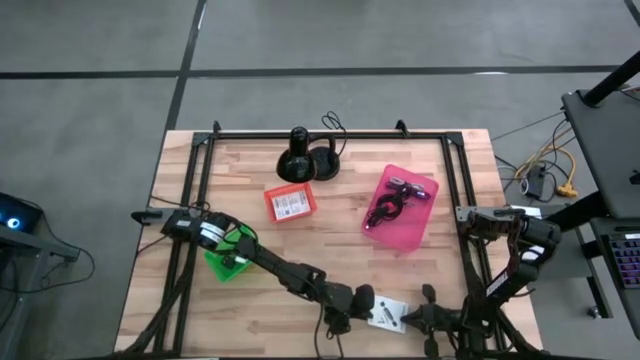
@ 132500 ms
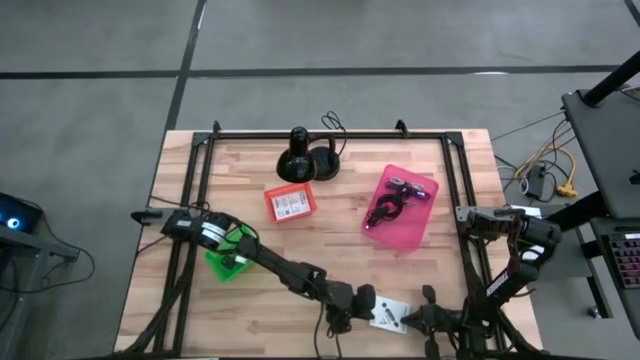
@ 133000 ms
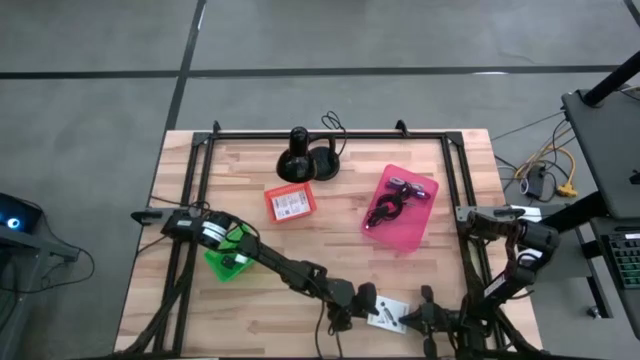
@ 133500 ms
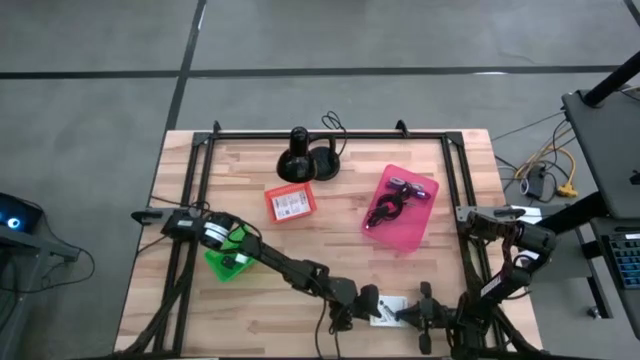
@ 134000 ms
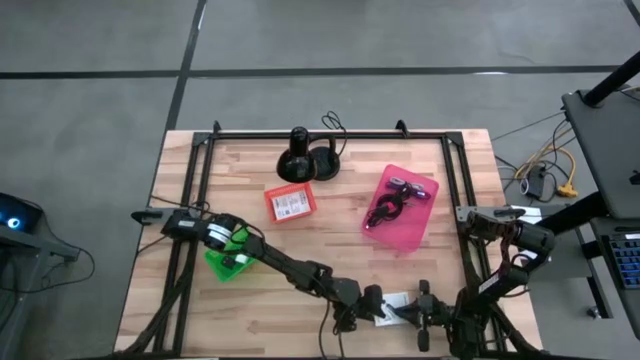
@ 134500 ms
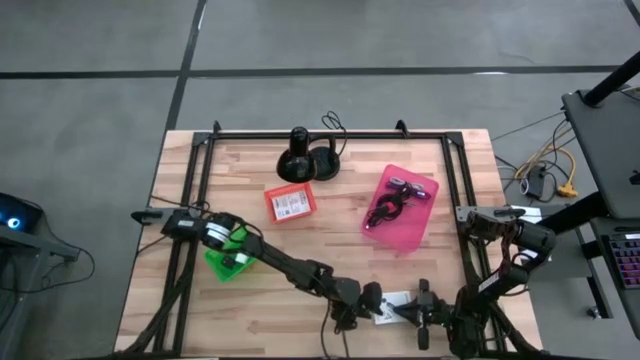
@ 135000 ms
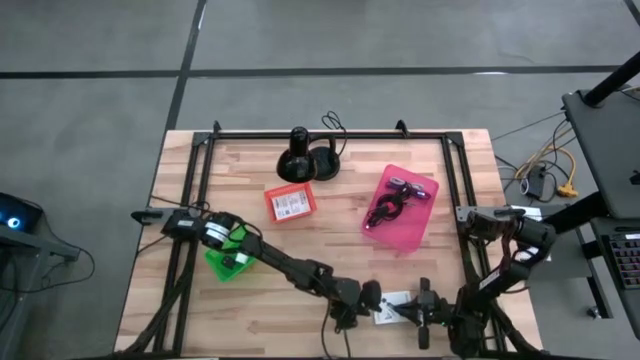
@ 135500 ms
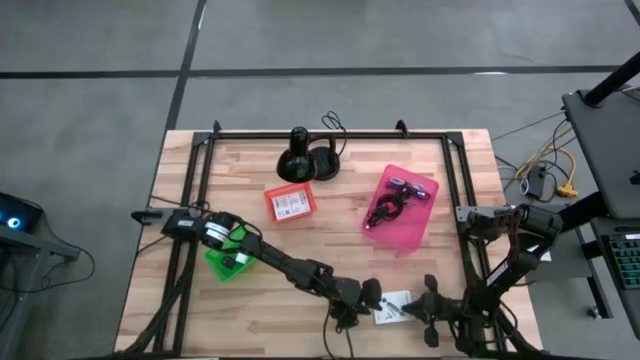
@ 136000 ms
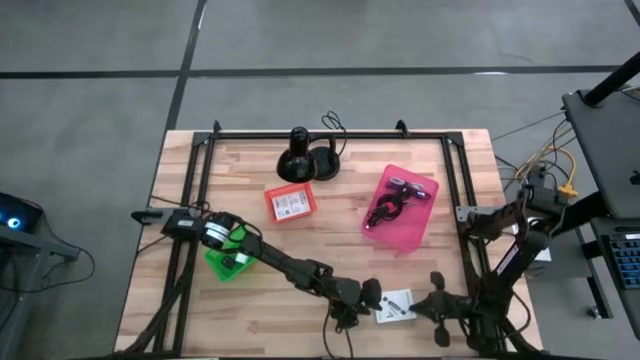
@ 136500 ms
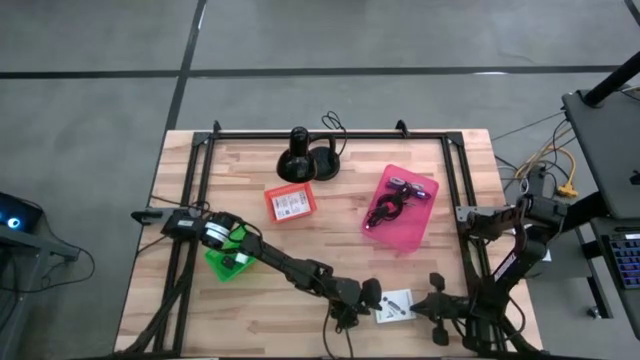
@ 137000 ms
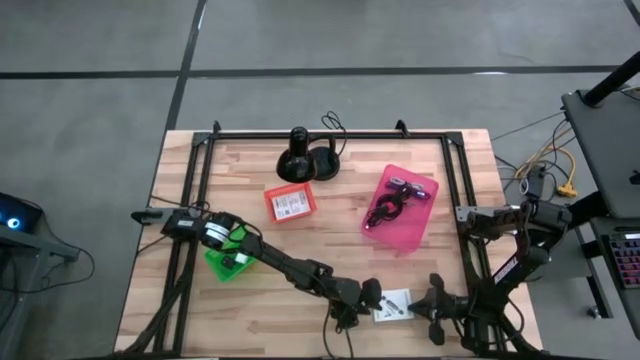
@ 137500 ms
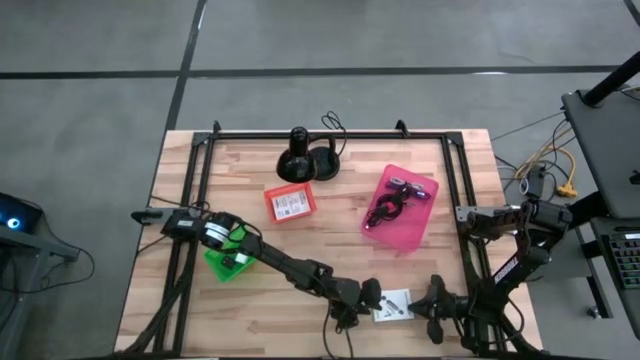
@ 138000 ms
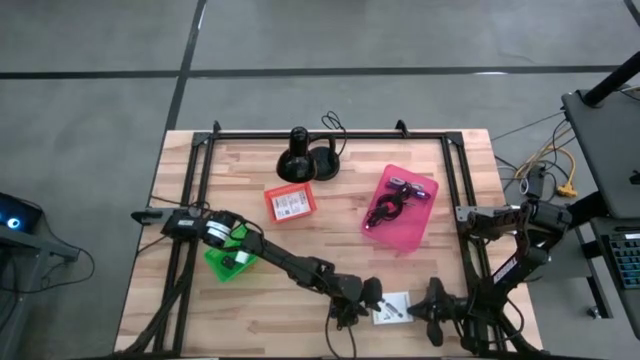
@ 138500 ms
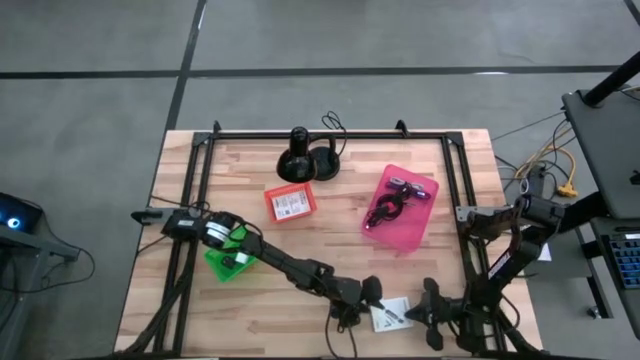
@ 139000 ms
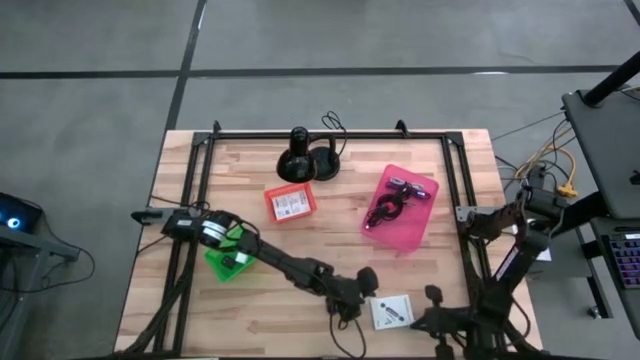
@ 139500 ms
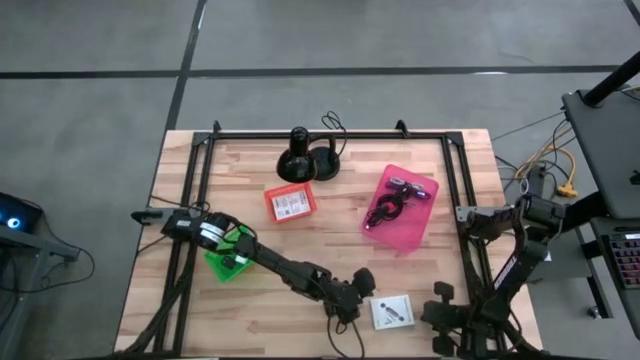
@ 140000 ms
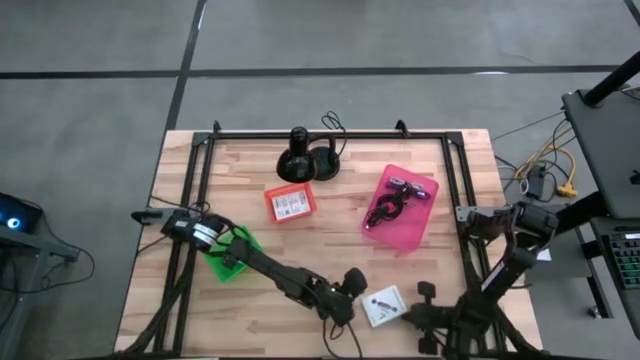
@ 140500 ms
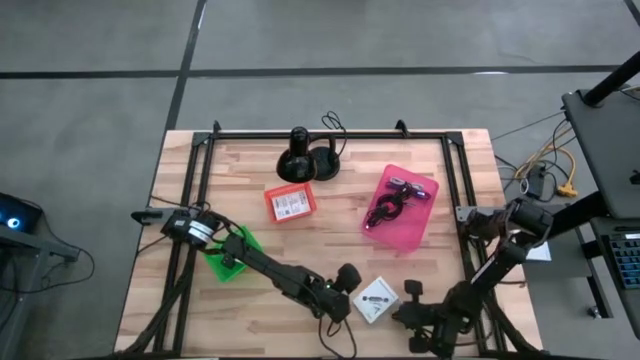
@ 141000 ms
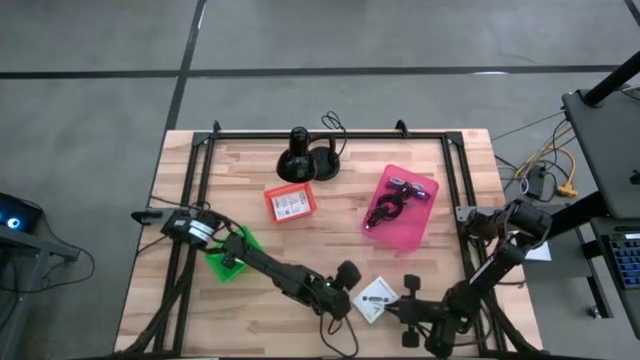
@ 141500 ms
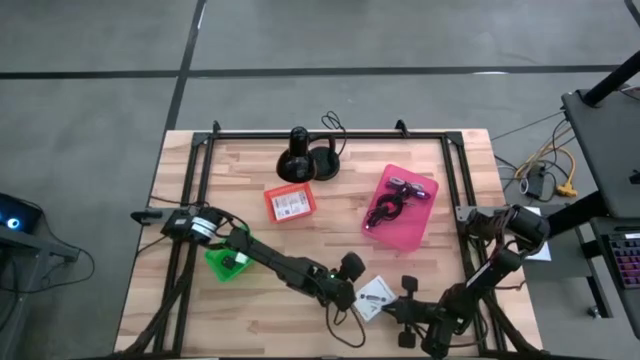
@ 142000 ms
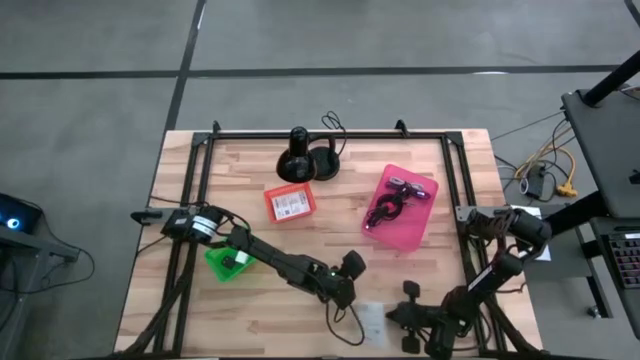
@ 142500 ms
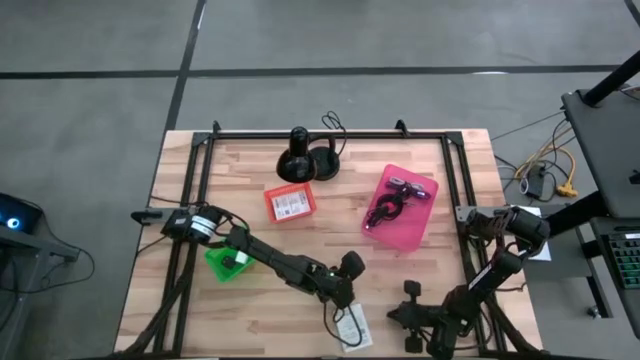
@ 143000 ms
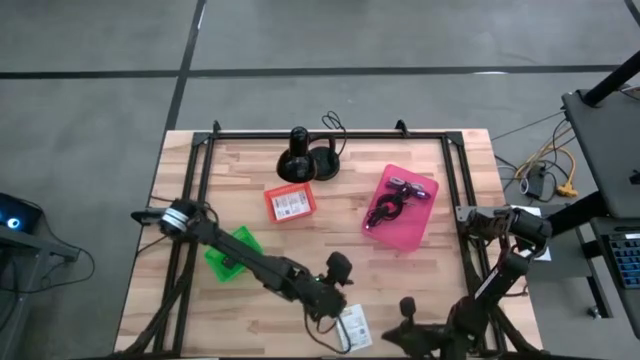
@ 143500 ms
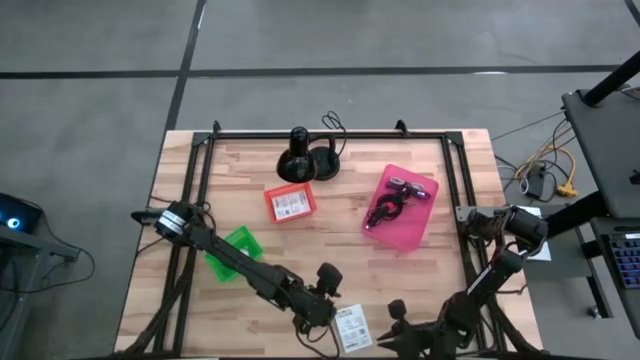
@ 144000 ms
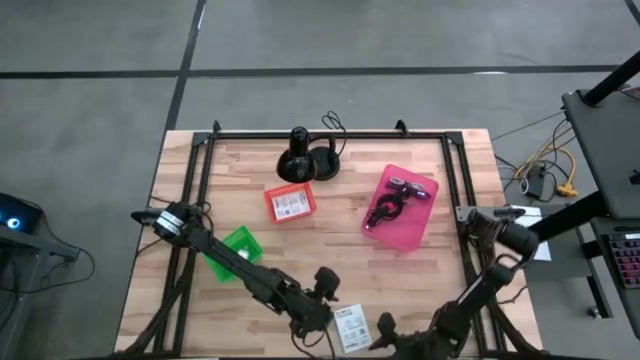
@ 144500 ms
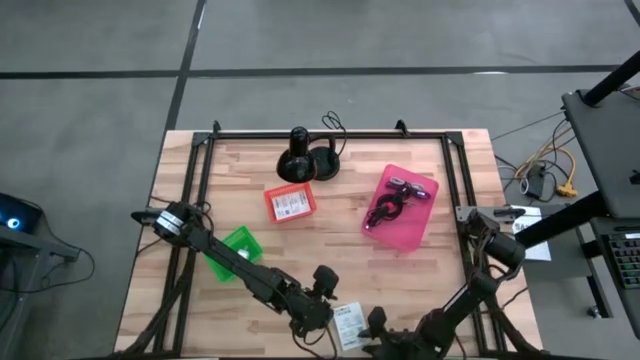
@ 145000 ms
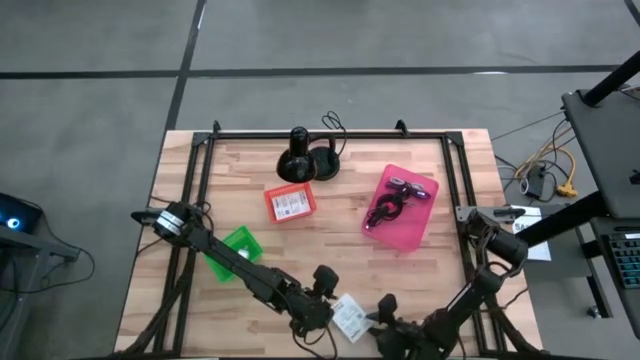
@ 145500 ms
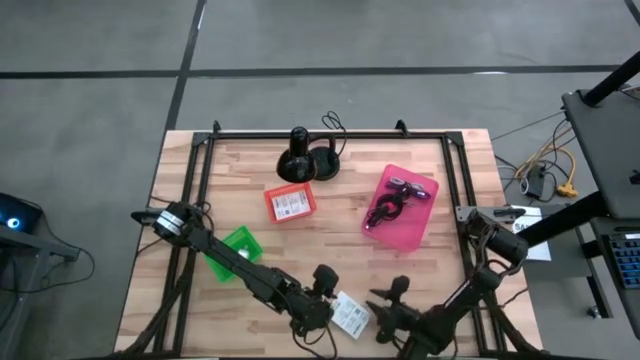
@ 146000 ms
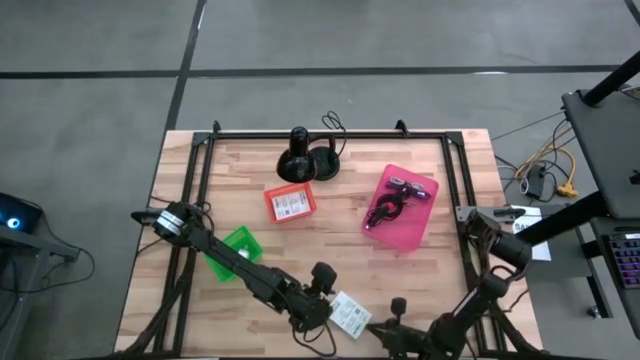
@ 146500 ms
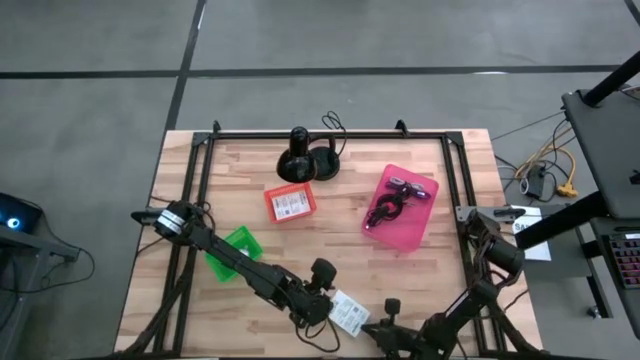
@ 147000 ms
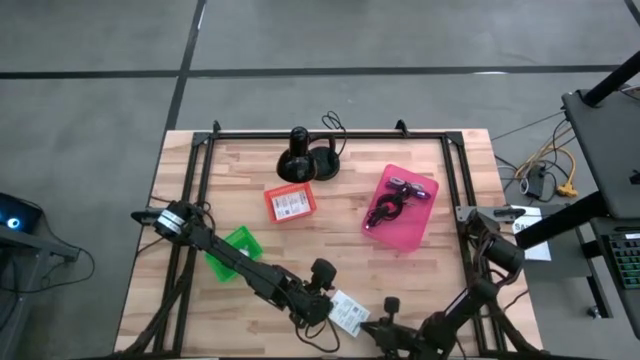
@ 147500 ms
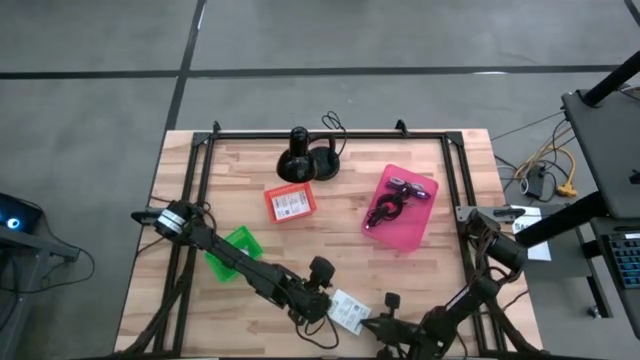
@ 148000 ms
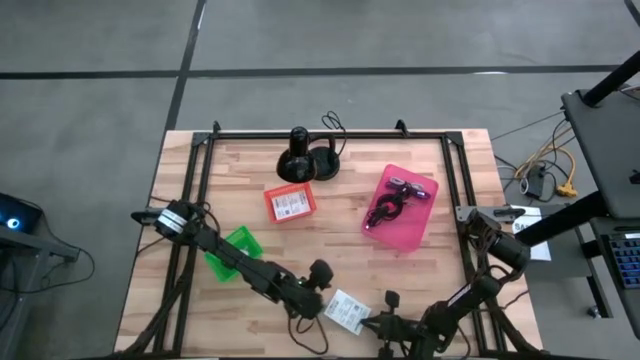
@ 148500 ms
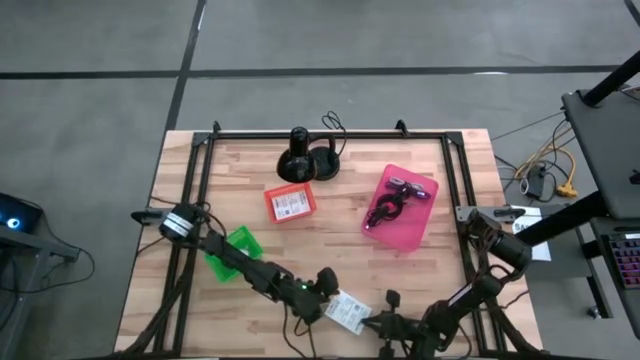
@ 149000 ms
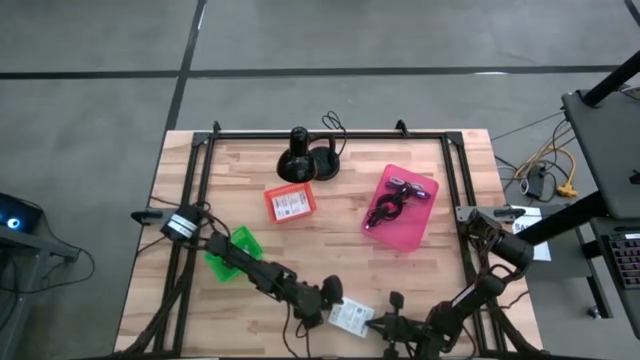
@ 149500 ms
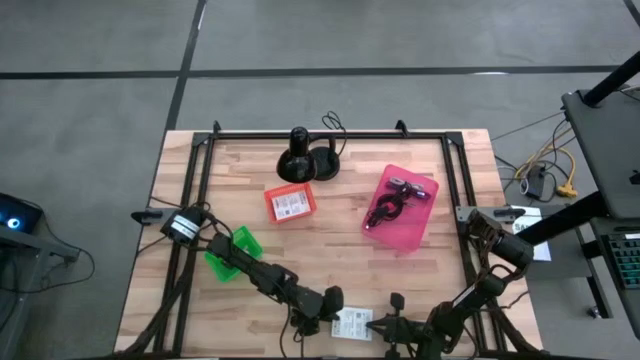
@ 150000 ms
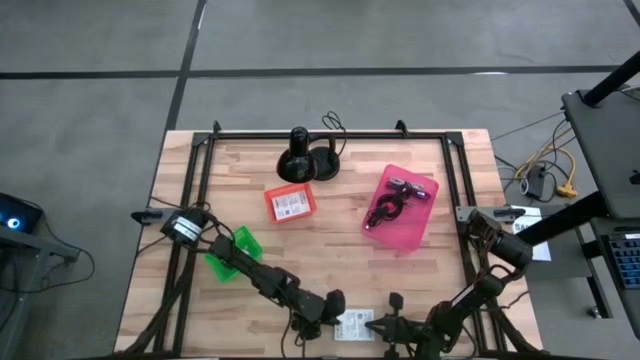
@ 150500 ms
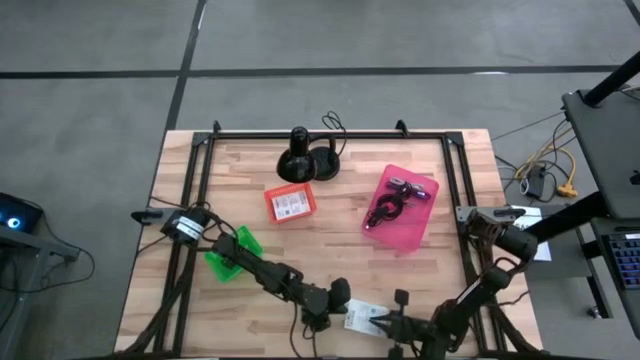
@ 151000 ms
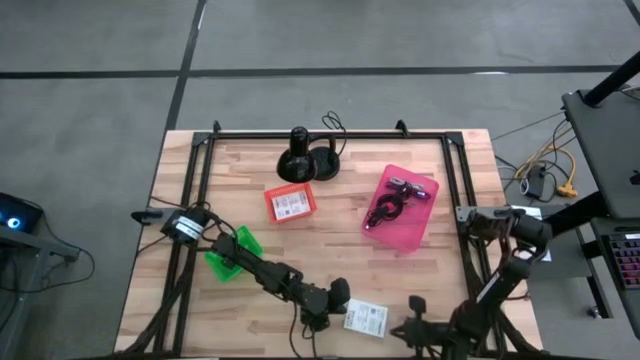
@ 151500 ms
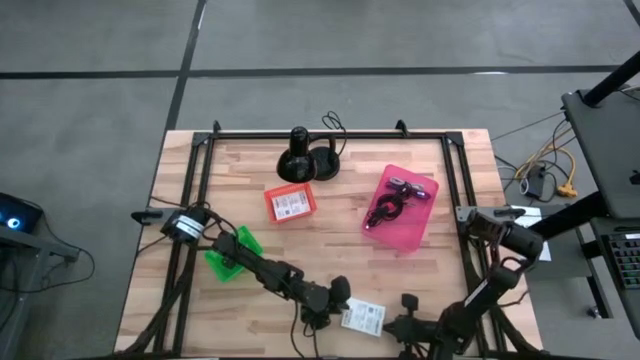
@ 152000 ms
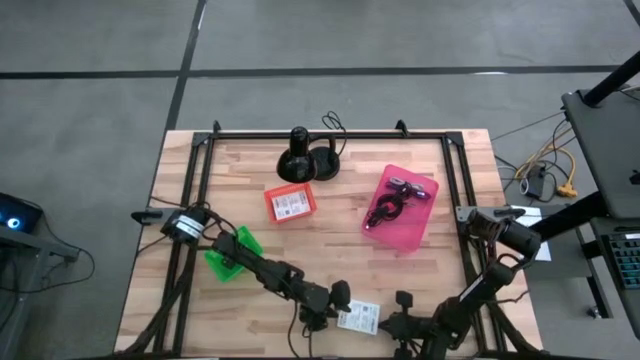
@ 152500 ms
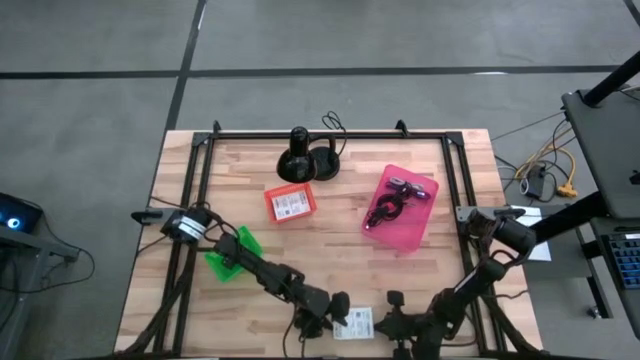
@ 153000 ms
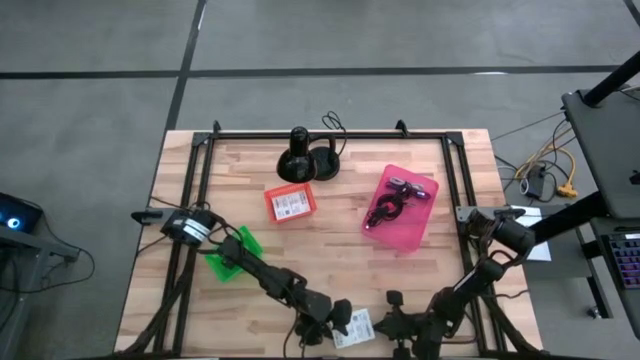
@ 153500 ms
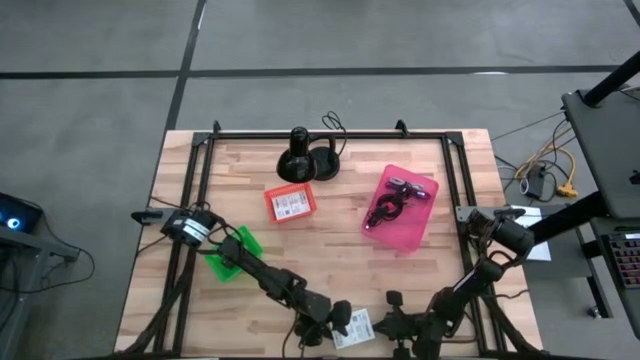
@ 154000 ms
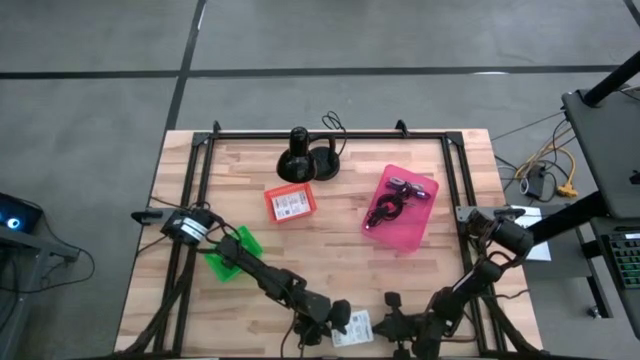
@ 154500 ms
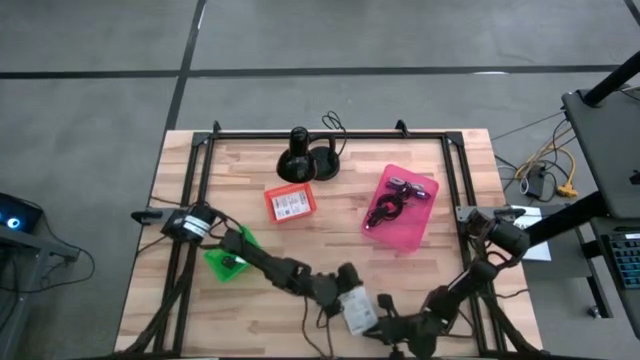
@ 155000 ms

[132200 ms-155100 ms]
Task: Pick and place items into bin
Stack the card reader box on top of the card reader box in the orange bin
